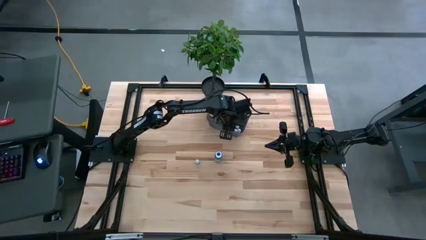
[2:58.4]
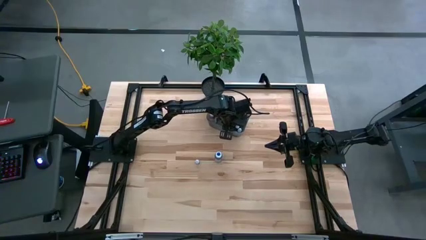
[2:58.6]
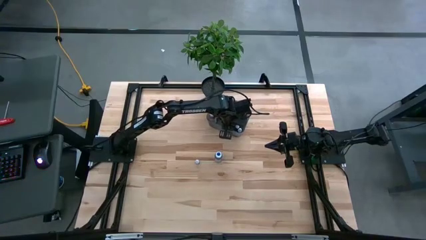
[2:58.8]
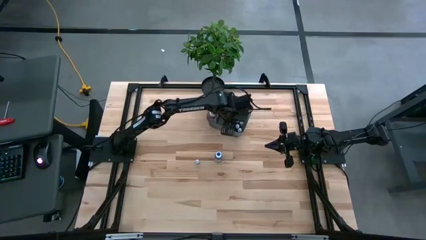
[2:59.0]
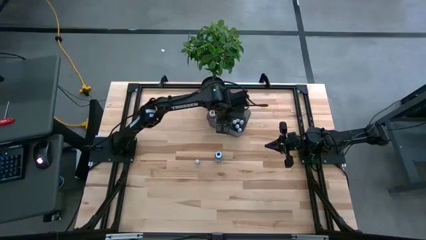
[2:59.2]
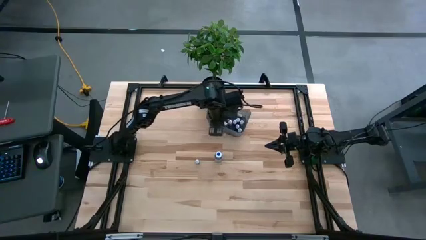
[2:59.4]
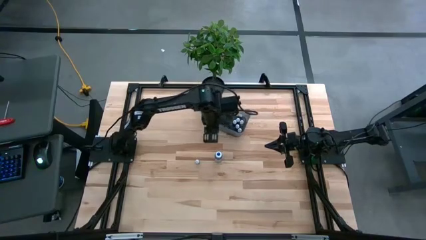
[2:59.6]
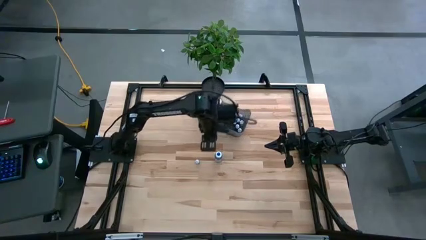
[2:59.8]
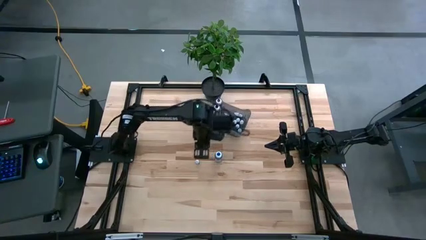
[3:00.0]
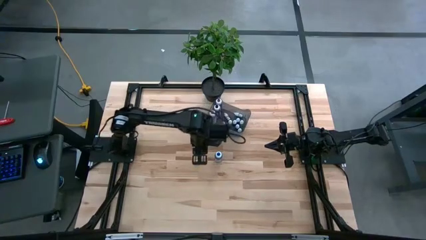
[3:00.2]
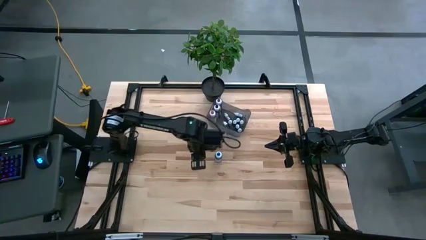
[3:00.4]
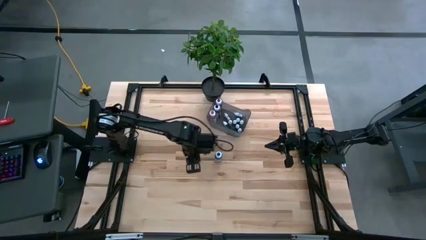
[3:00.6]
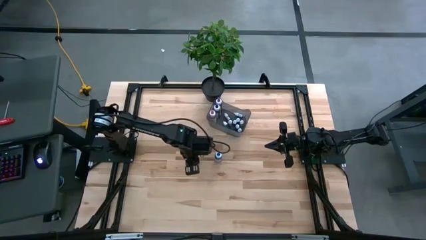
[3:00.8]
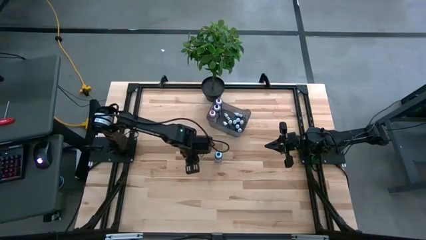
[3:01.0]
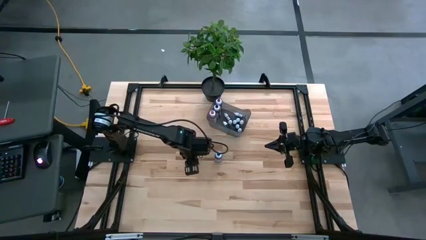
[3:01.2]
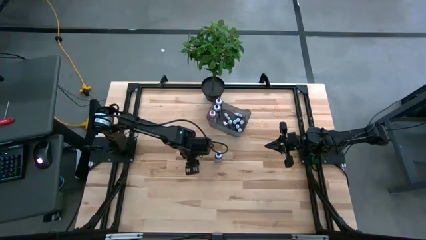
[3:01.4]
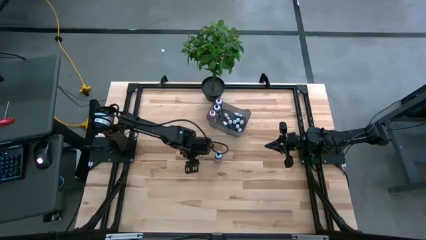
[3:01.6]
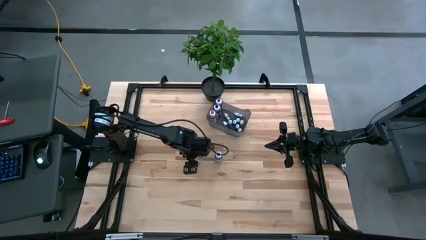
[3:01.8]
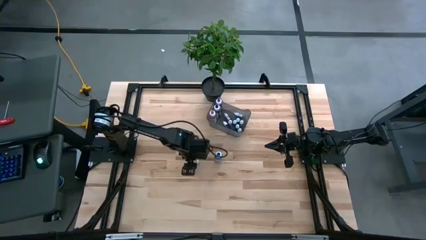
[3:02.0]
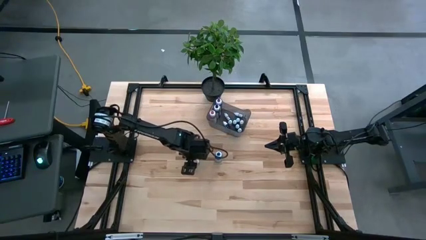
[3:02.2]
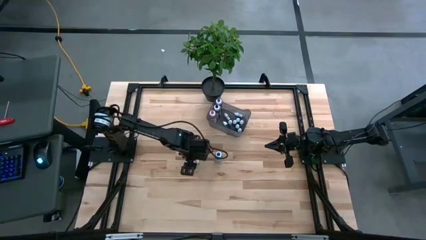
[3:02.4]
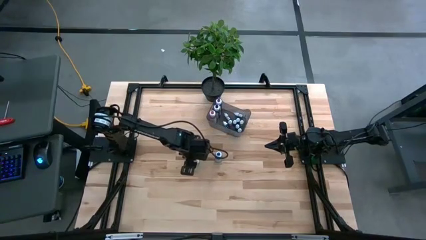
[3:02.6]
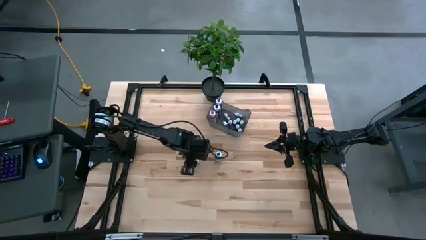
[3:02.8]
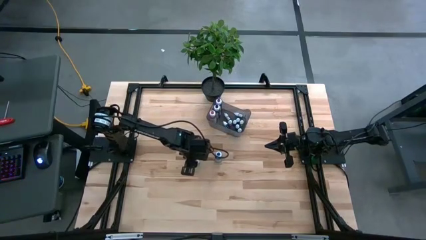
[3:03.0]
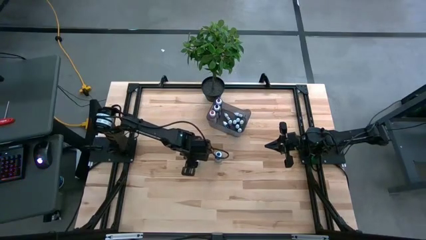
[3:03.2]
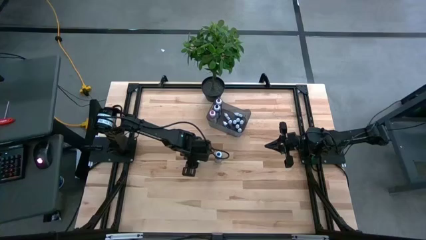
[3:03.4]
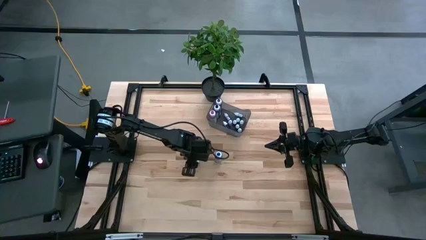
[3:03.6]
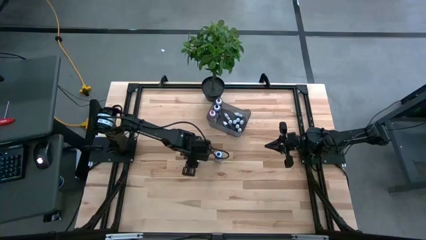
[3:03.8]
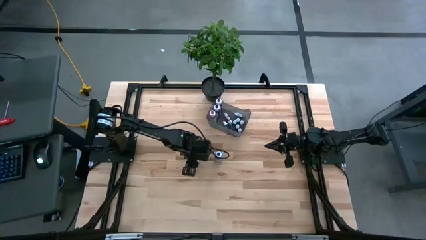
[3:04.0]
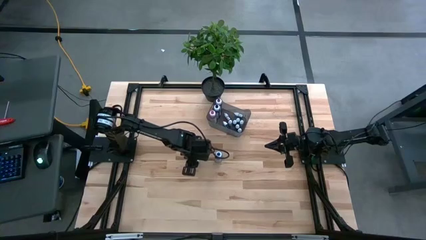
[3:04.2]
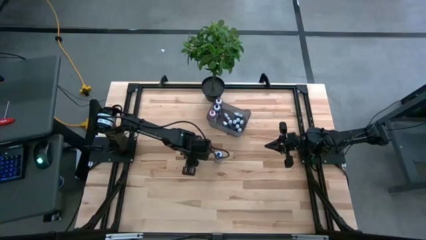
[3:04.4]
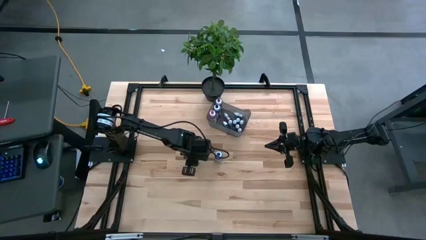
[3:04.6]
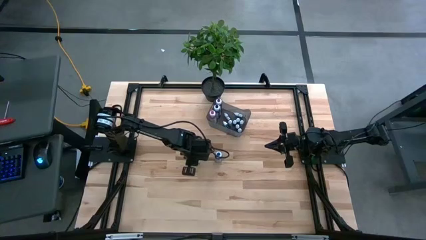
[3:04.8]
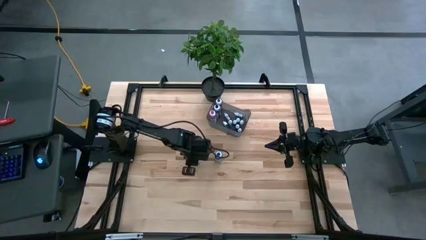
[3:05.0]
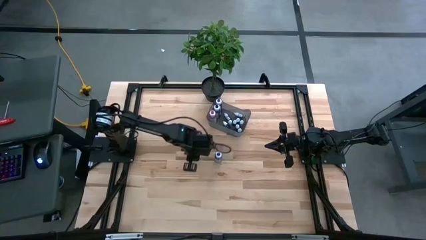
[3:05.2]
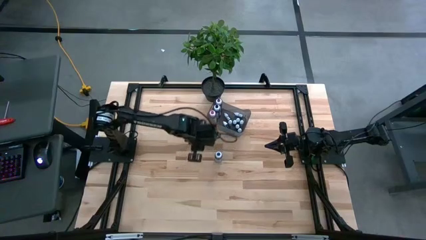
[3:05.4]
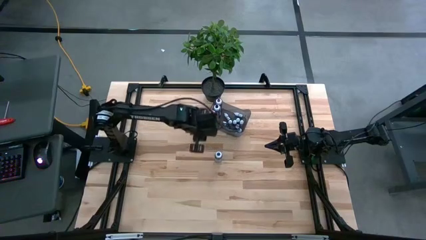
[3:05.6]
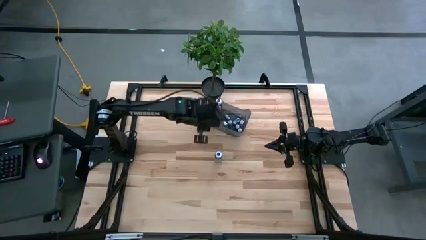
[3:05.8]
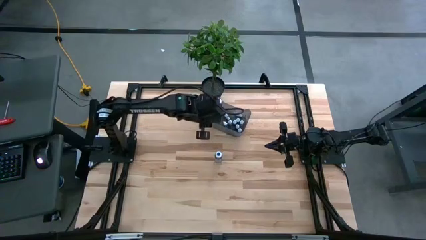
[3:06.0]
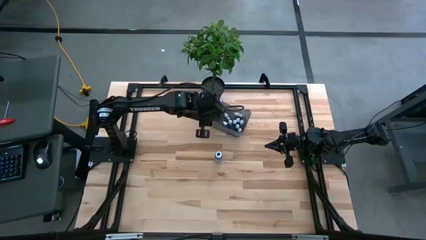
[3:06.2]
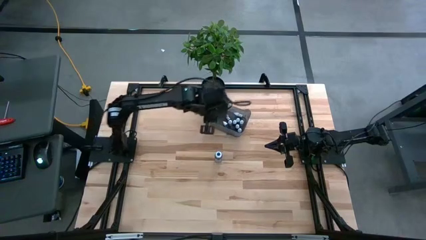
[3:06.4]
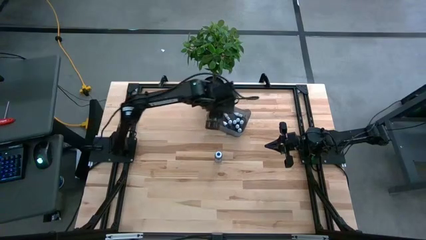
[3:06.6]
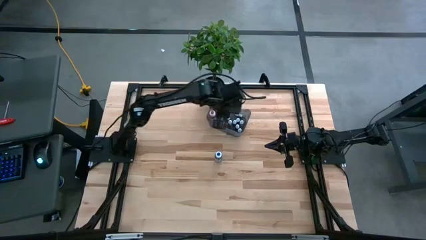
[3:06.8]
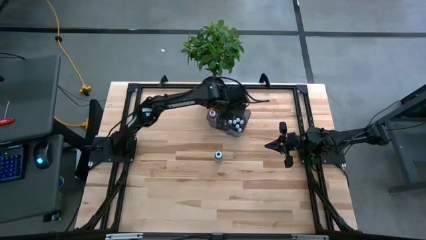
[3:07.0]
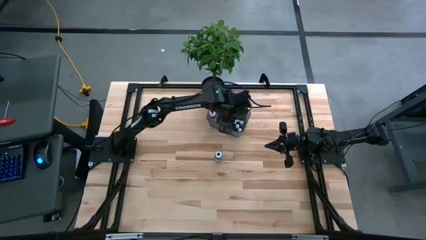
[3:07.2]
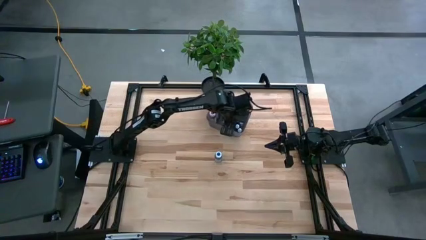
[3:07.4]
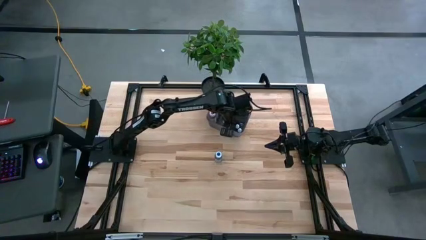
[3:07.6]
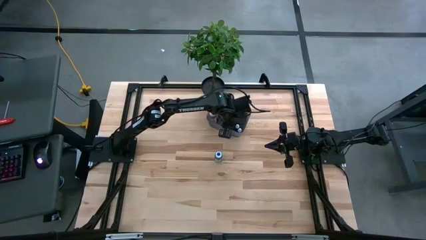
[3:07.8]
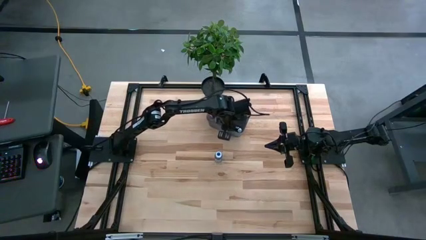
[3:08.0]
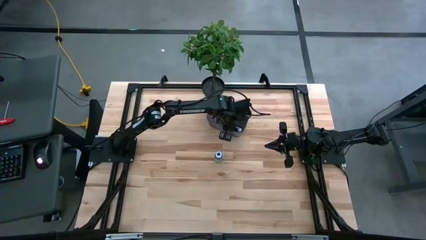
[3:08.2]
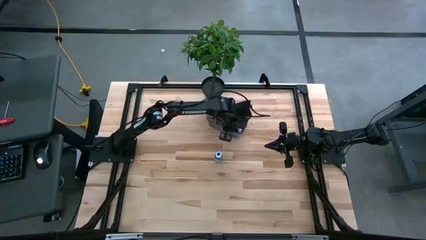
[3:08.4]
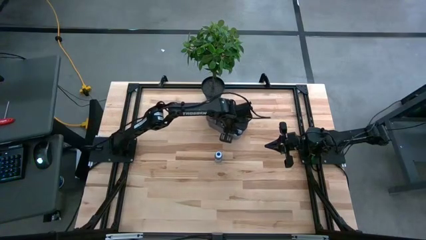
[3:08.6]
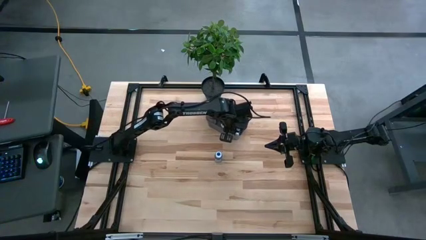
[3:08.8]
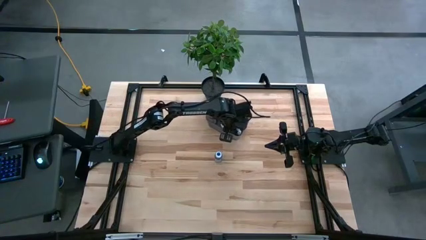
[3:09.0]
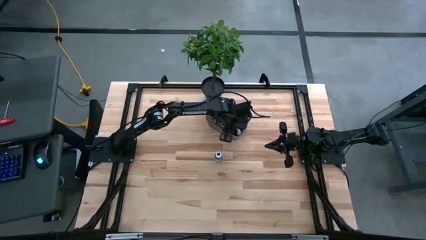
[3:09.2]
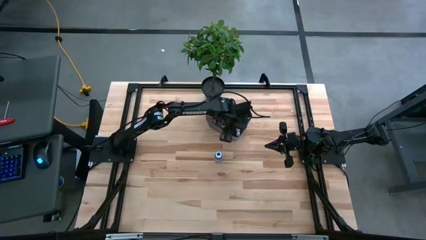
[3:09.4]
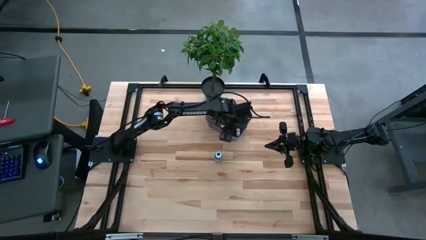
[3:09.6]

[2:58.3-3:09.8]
Task: Pick & Place food coloring
Put the small black food coloring bottle into the black bin

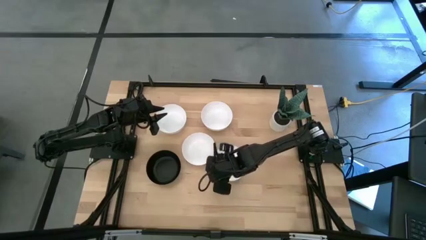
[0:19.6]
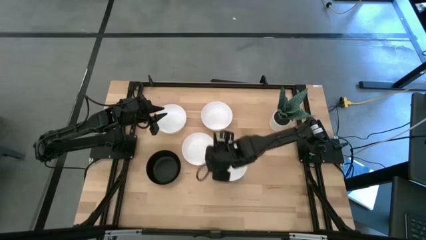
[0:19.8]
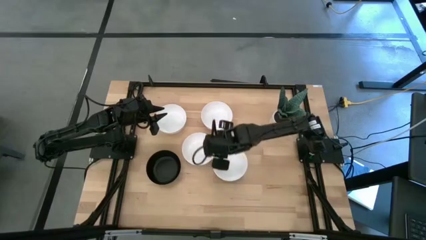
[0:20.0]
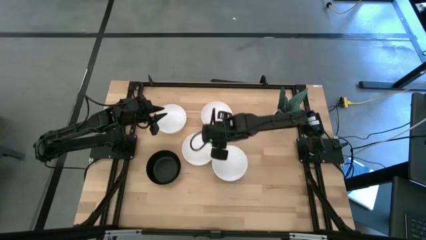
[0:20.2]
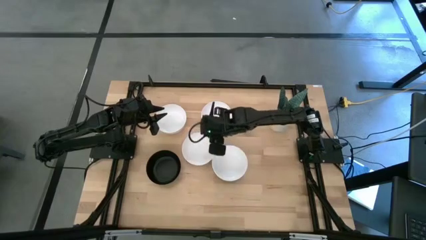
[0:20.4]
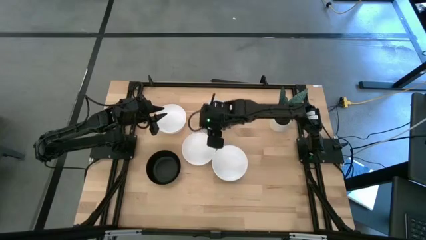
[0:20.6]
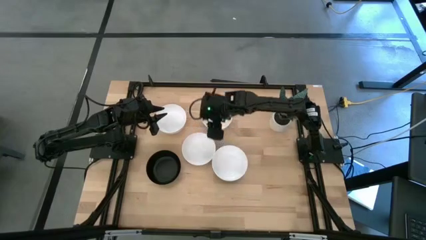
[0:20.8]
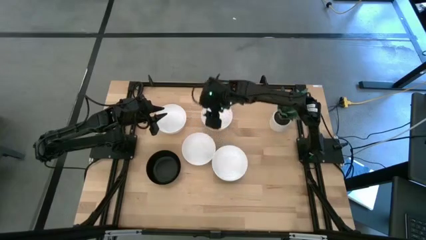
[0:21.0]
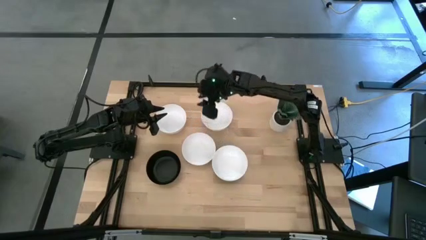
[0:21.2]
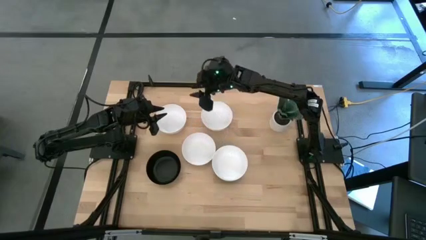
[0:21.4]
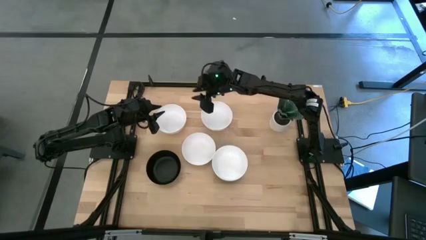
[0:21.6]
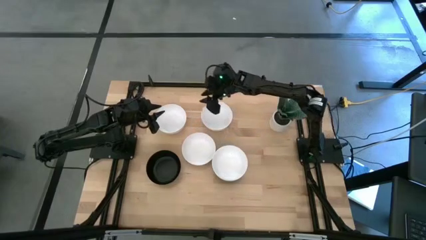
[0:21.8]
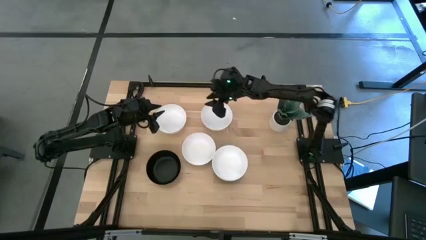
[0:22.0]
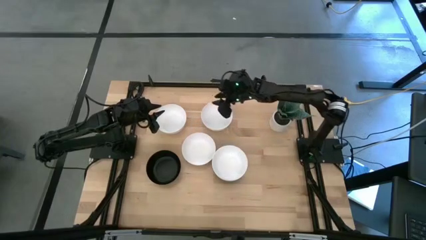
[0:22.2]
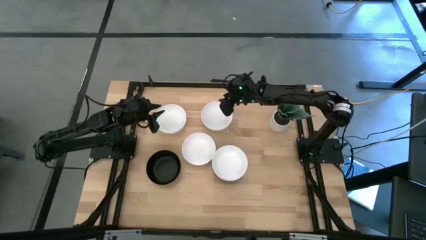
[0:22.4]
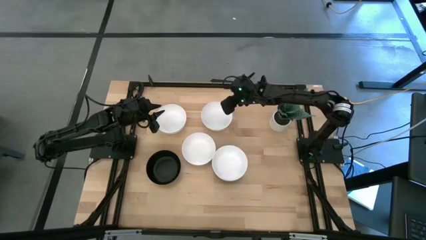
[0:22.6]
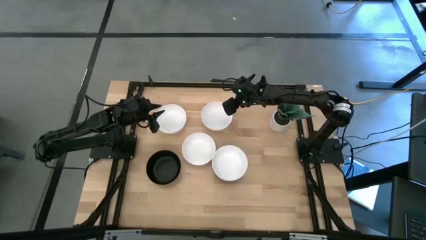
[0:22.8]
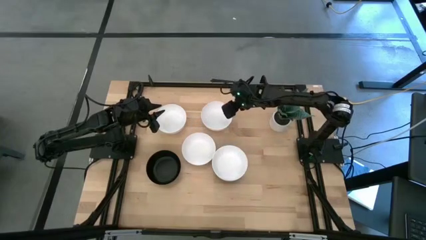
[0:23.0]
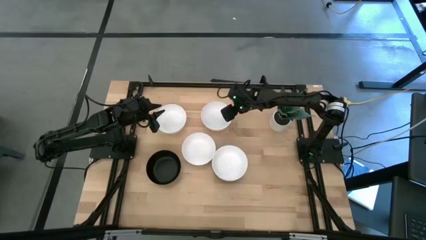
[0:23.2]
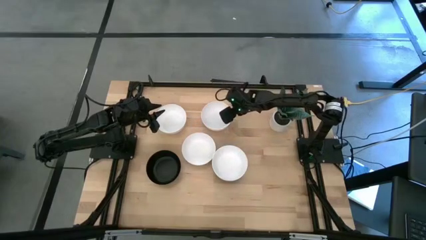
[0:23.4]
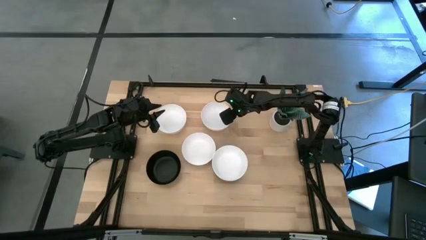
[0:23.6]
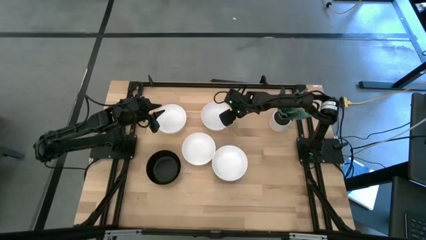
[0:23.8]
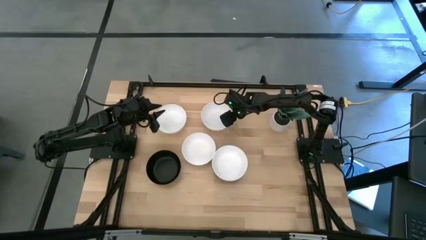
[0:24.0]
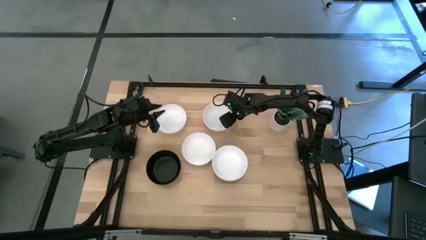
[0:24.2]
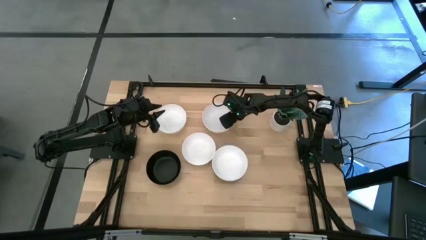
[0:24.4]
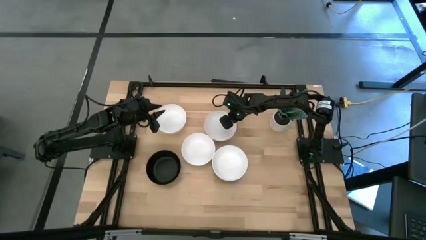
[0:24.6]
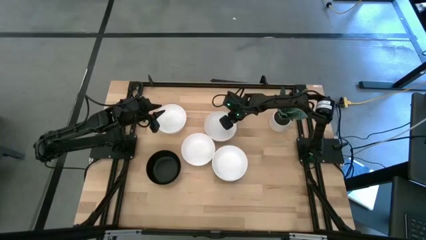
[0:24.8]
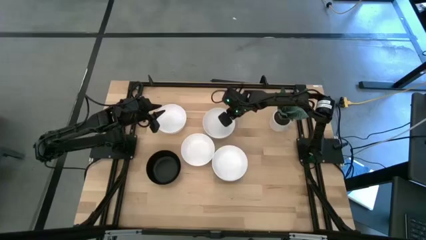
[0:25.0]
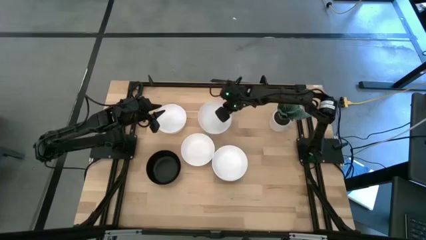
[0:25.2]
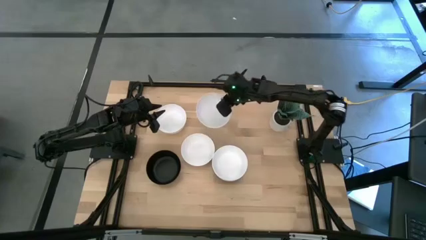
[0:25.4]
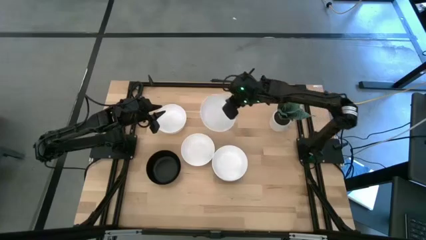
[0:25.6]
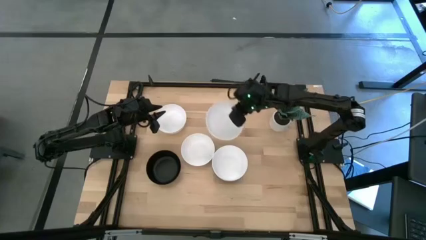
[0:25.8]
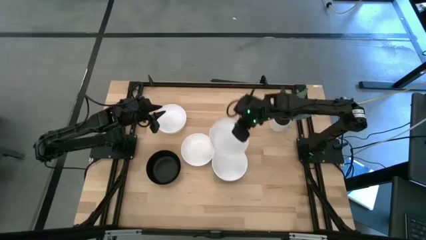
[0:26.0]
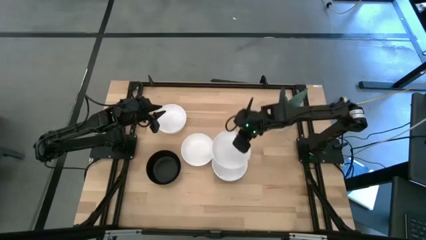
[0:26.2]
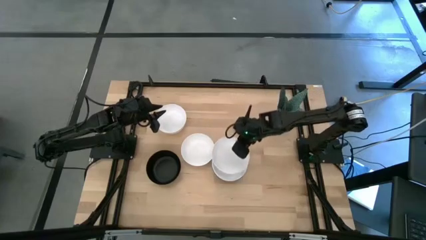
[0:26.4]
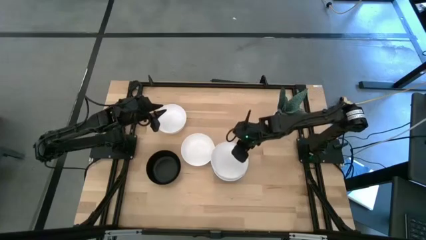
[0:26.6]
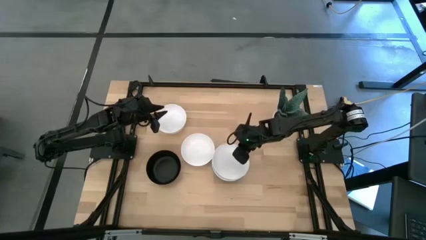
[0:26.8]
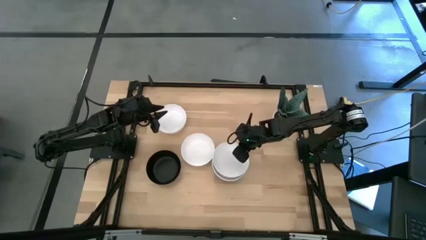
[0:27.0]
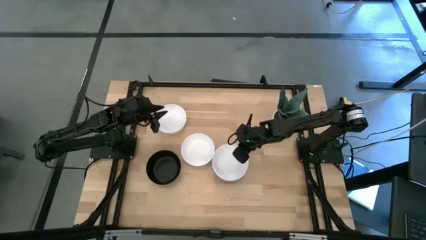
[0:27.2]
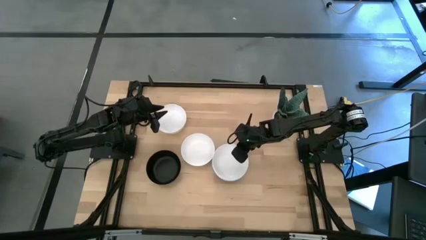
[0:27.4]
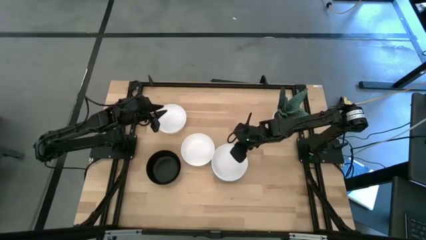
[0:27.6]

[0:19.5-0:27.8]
Task: Nest bowls inside each other
Stack the white bowl on top of the stacked bowls
